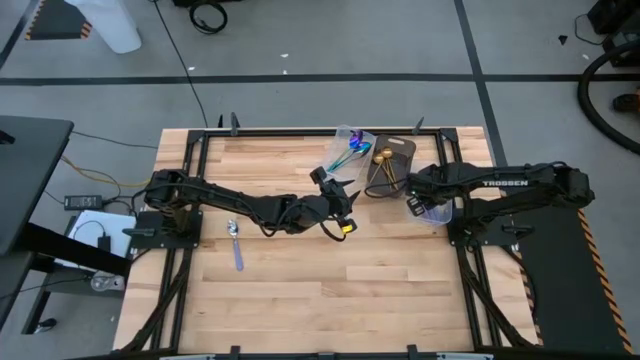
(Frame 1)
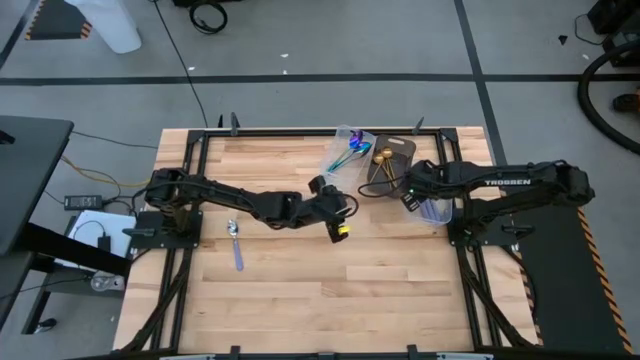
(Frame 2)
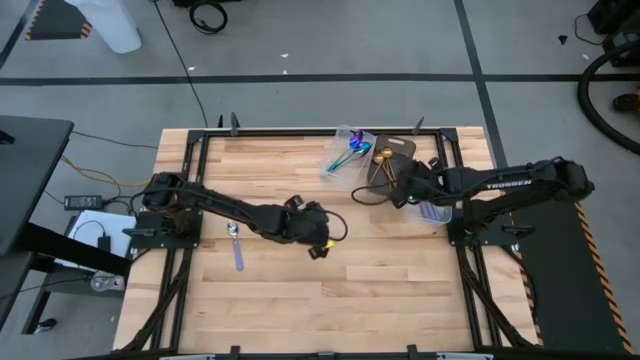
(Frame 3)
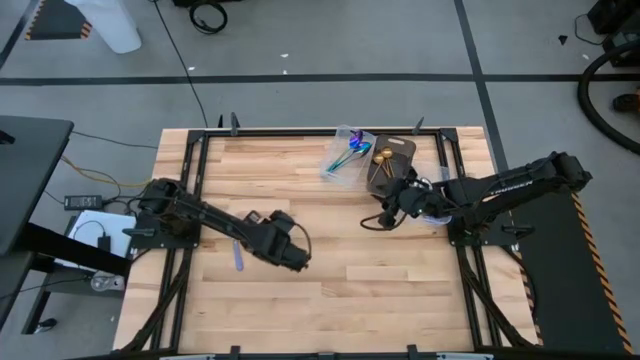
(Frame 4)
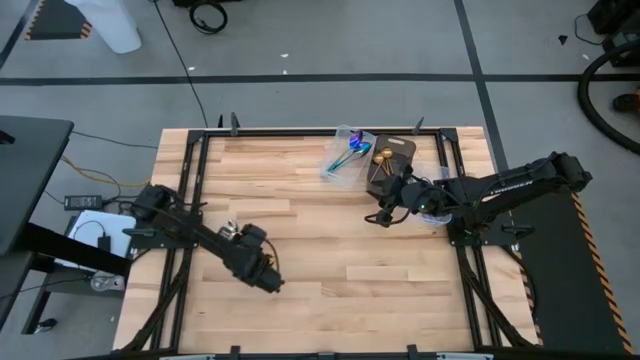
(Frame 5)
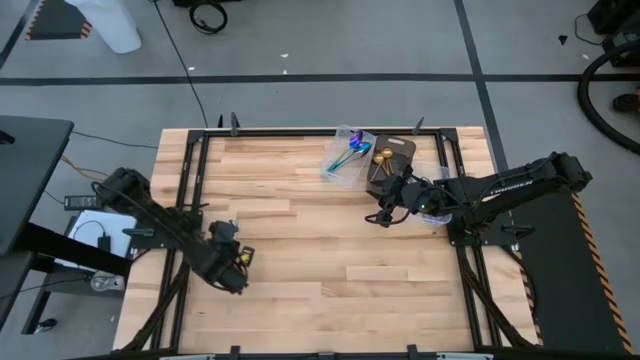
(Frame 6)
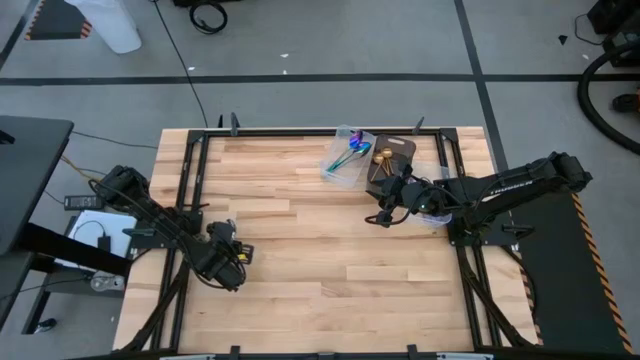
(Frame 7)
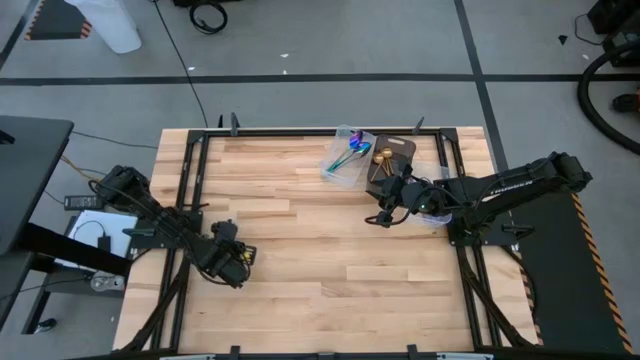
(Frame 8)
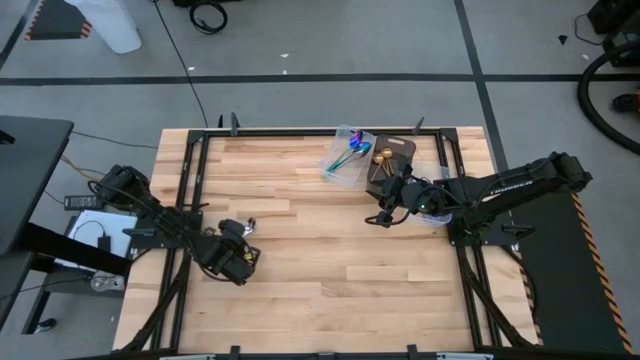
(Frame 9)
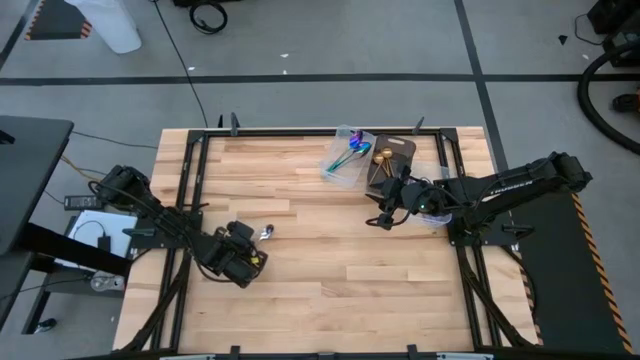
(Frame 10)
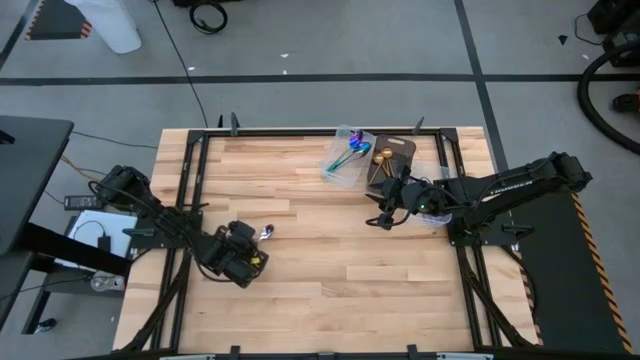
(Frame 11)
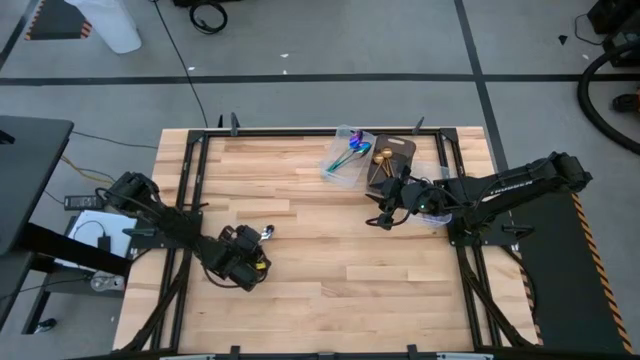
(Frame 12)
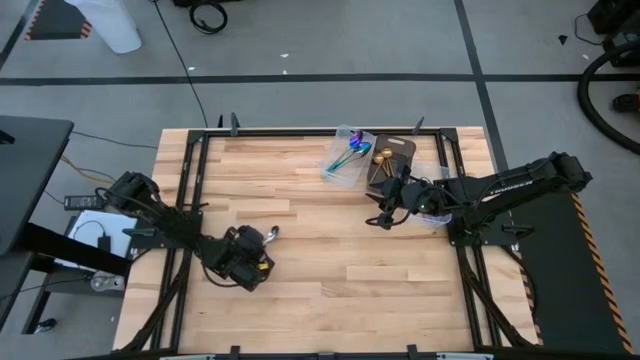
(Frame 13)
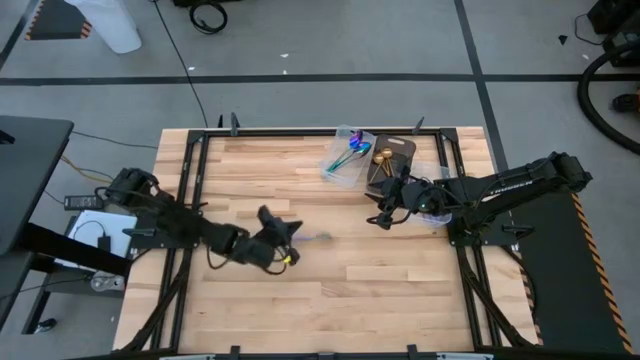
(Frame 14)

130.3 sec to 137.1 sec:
Task: Sort silverware by color (type)
Put the purple spoon into the right transparent bin

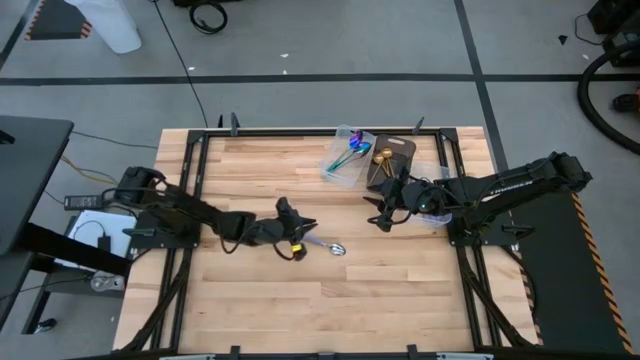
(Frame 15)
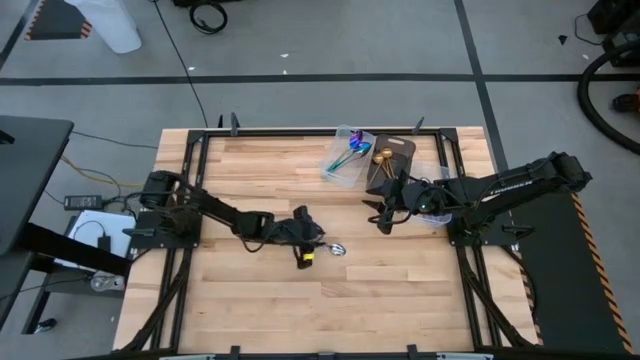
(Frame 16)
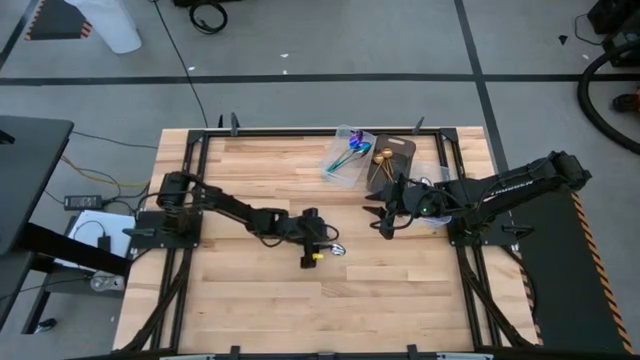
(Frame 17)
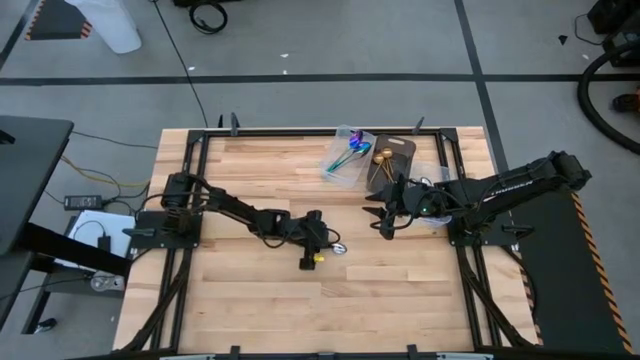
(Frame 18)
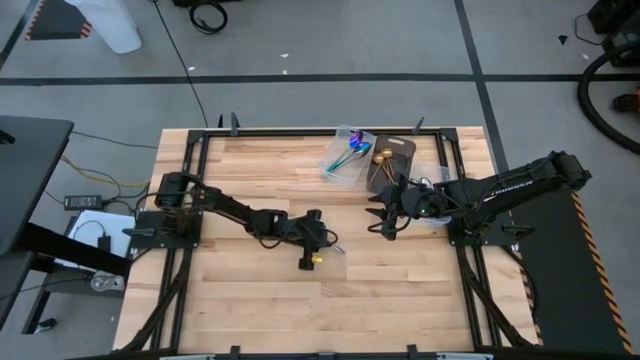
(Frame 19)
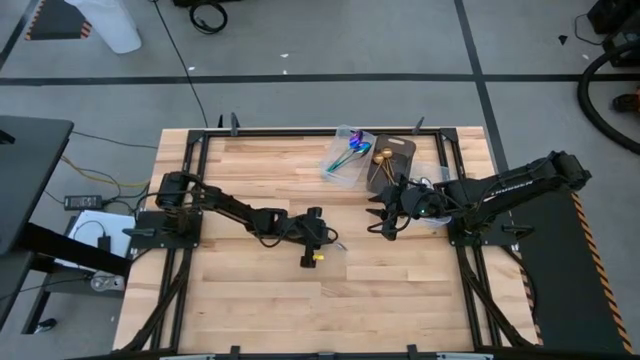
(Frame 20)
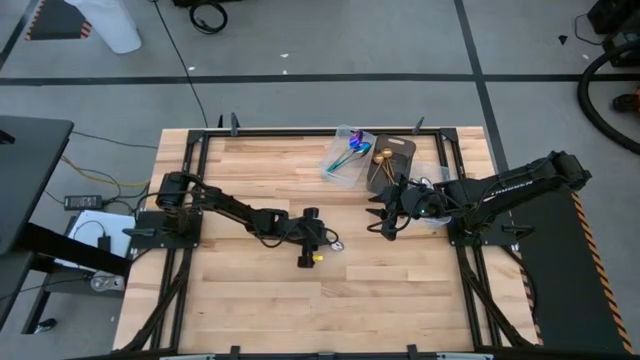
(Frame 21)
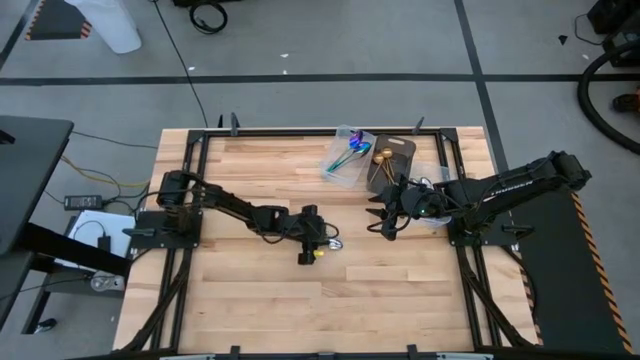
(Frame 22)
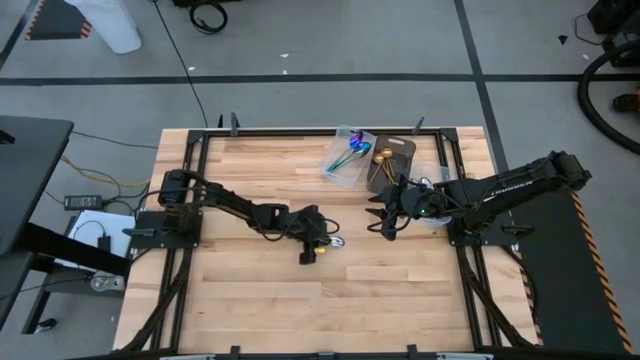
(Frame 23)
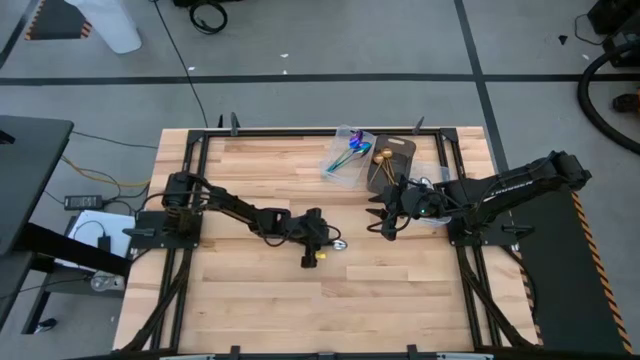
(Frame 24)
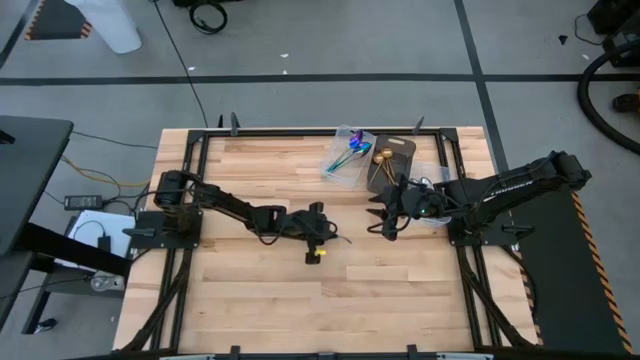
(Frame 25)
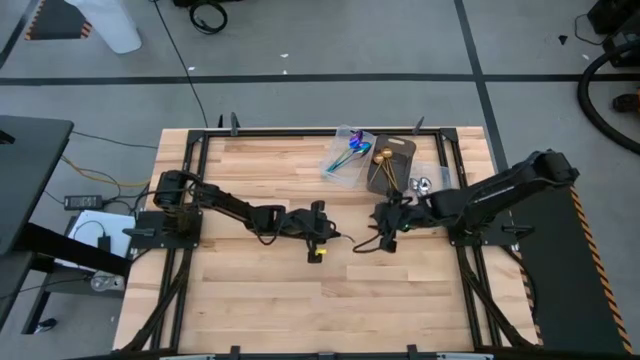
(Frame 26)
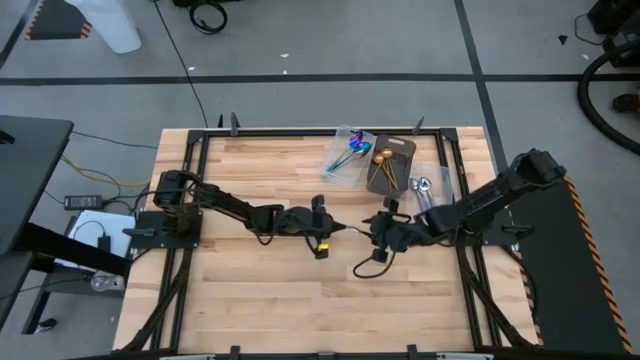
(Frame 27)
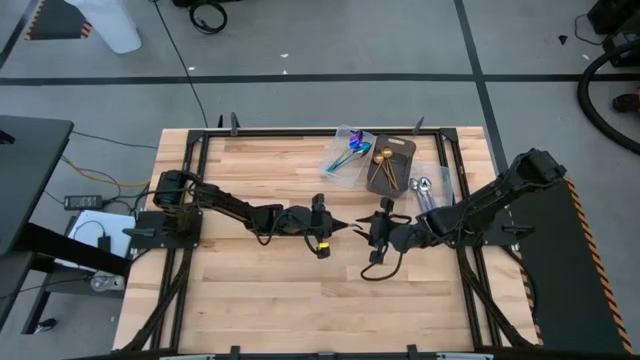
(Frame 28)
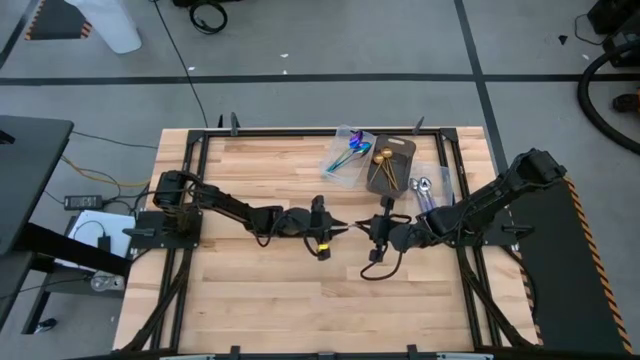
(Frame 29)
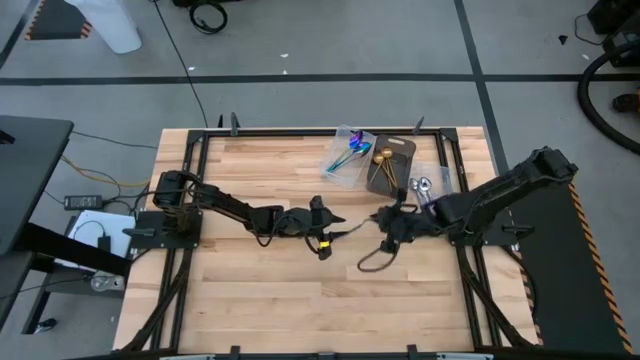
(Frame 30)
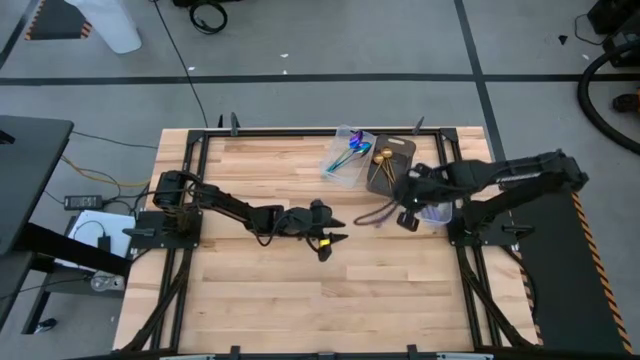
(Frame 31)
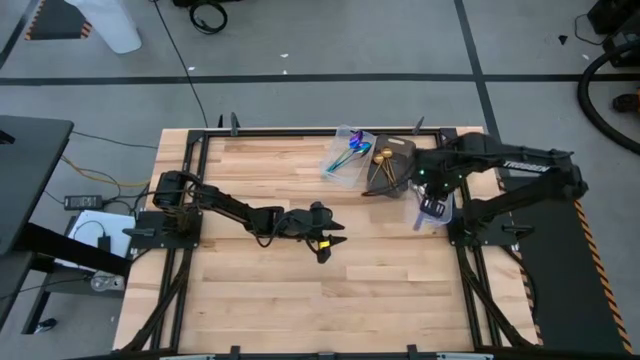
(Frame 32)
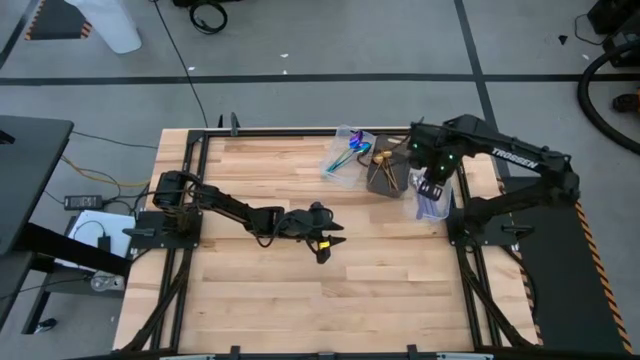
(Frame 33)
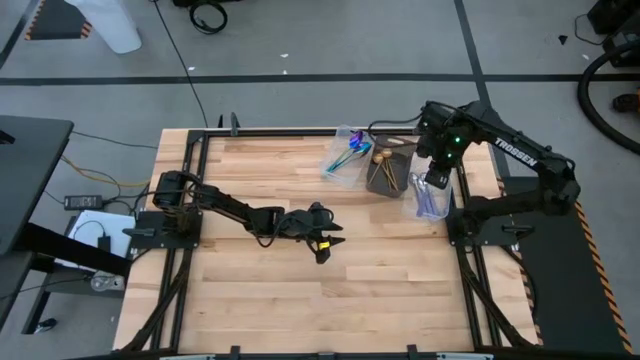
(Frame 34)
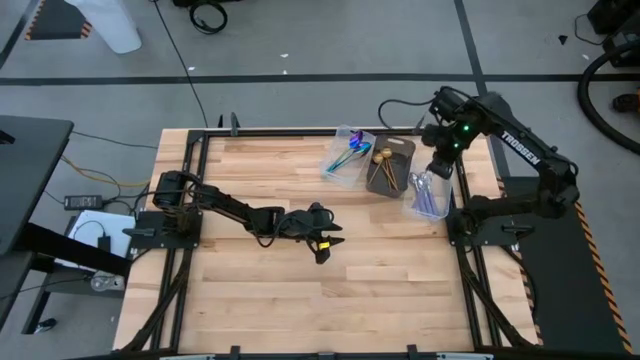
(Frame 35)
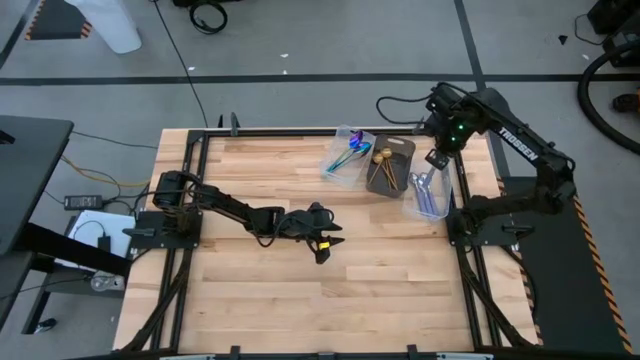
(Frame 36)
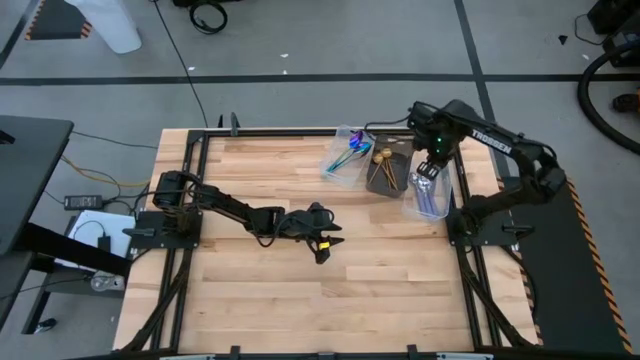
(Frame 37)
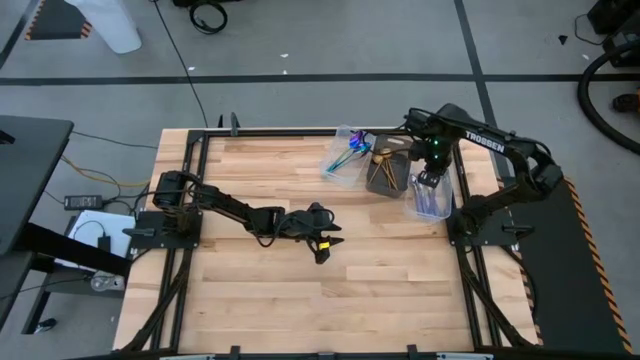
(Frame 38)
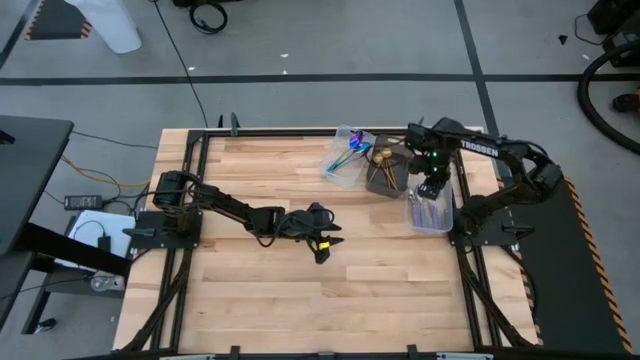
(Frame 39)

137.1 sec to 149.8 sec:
Put the purple spoon into the right transparent bin

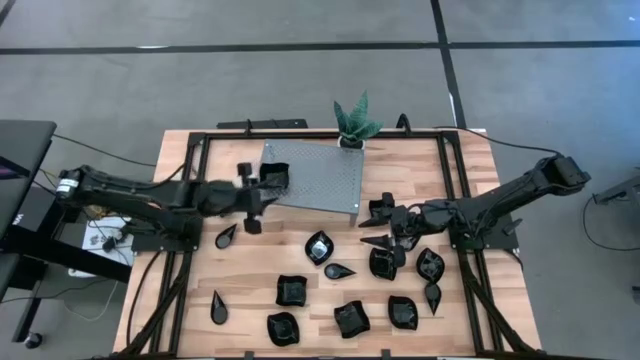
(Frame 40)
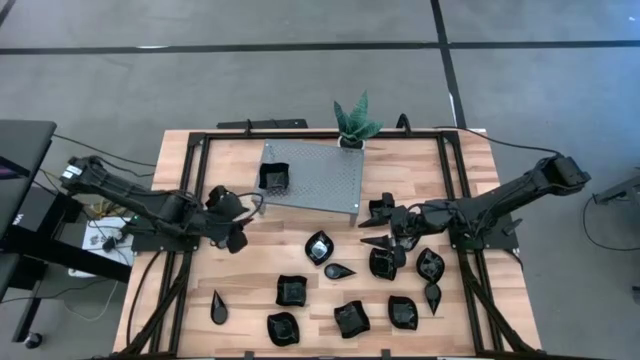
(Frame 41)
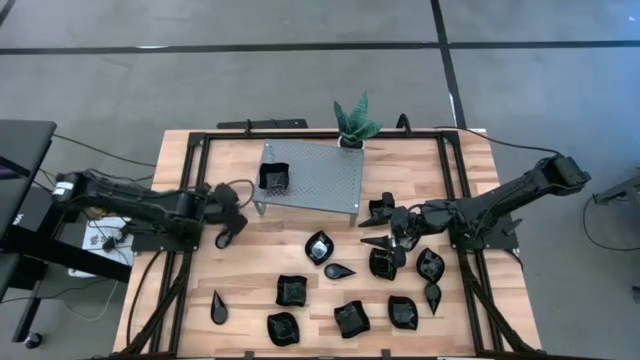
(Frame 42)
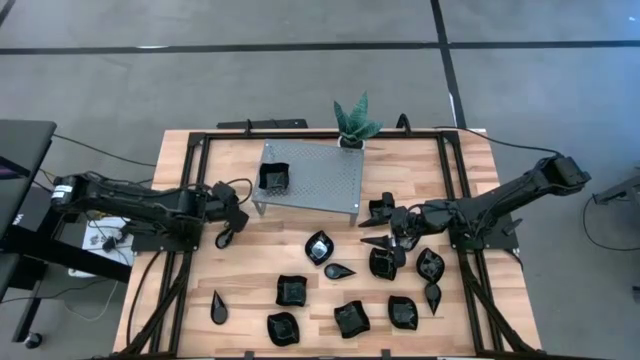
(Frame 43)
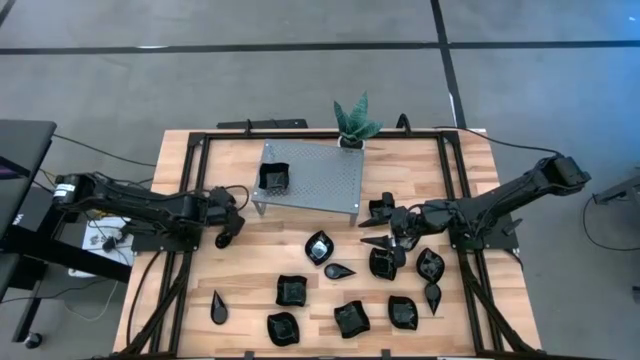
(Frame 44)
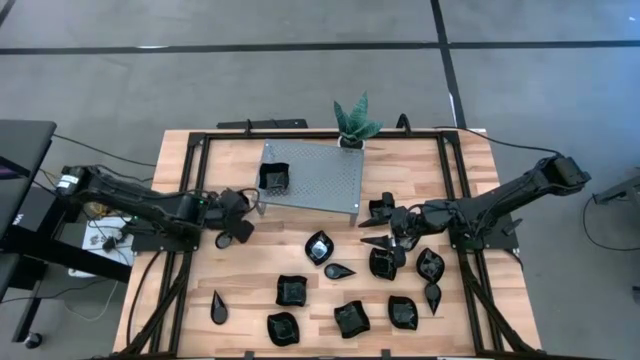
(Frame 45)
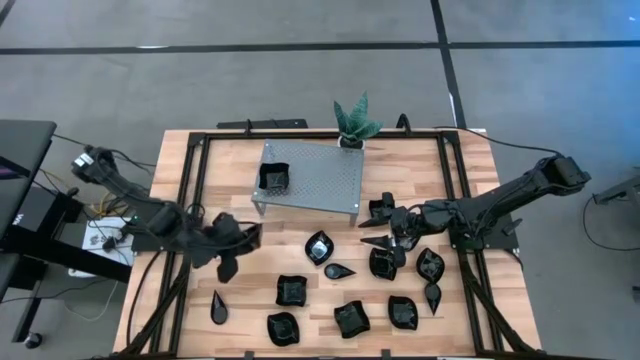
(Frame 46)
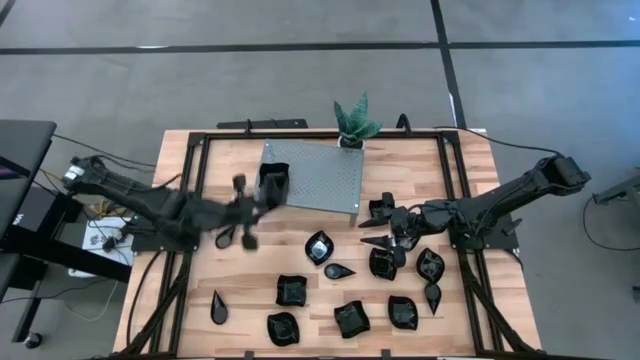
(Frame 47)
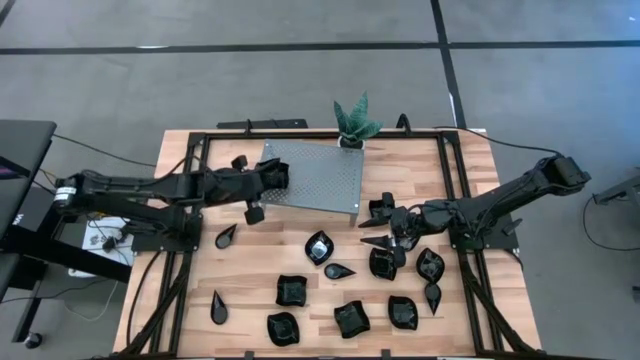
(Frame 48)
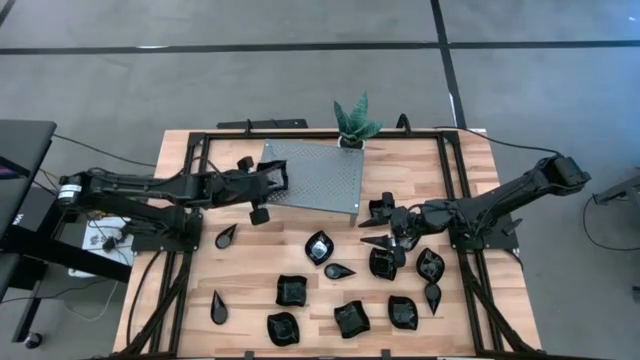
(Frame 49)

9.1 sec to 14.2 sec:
Task: Pick & Place Mini shaped plates
Stack the black distorted square plate on top of the black distorted square plate on the shelf
